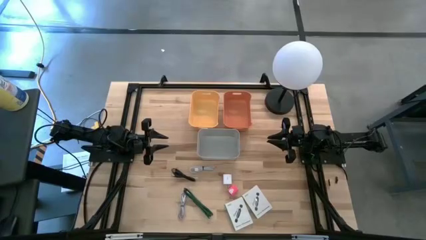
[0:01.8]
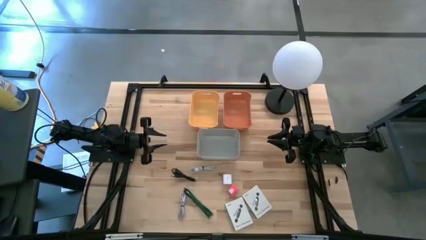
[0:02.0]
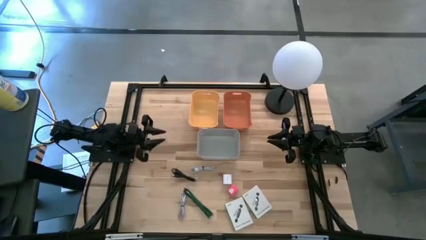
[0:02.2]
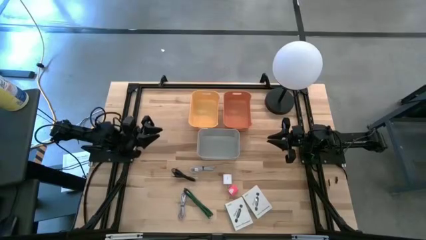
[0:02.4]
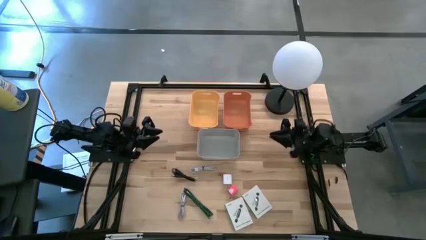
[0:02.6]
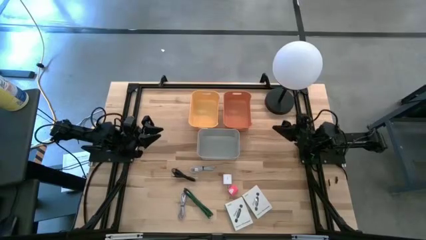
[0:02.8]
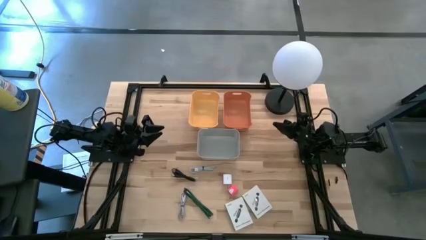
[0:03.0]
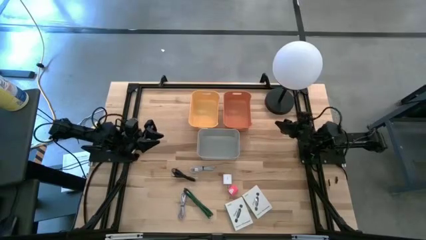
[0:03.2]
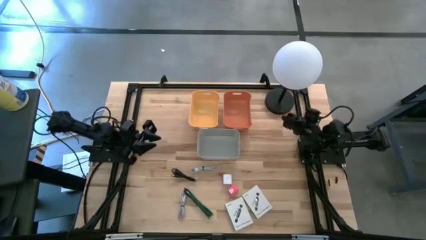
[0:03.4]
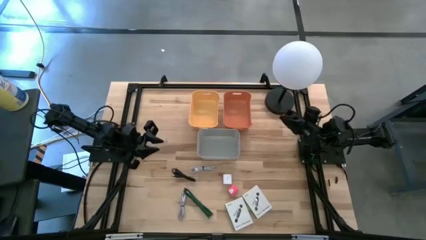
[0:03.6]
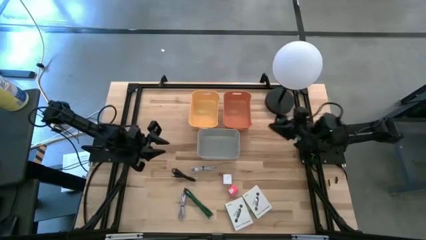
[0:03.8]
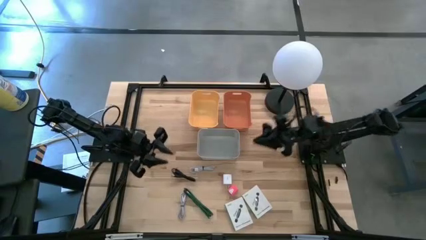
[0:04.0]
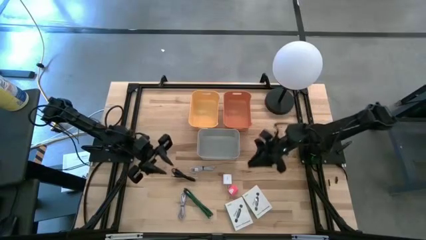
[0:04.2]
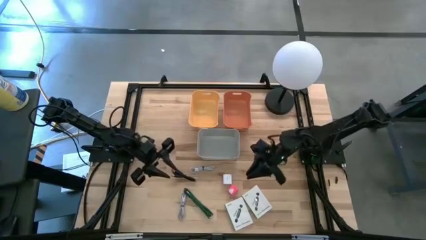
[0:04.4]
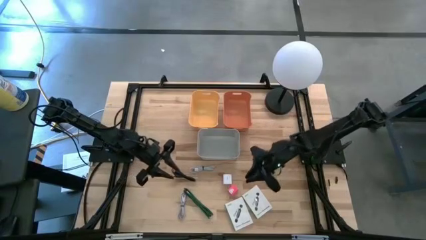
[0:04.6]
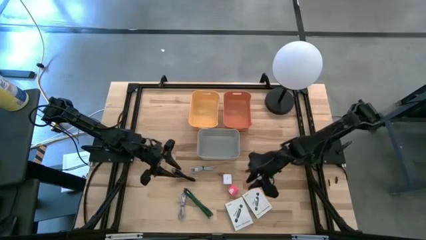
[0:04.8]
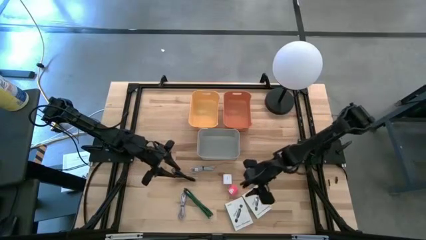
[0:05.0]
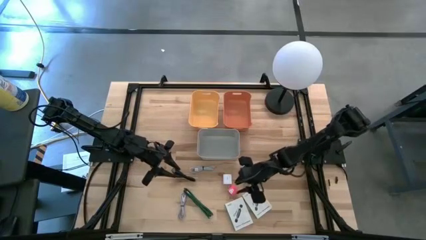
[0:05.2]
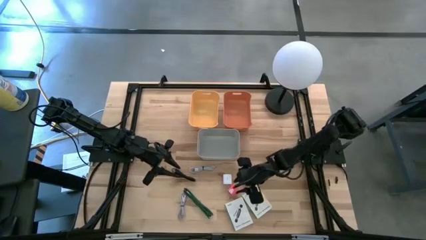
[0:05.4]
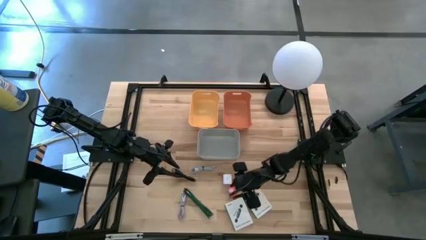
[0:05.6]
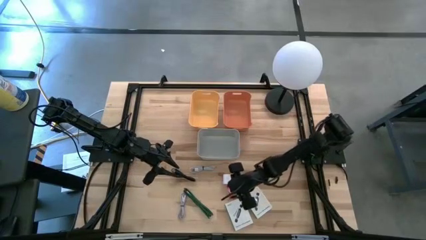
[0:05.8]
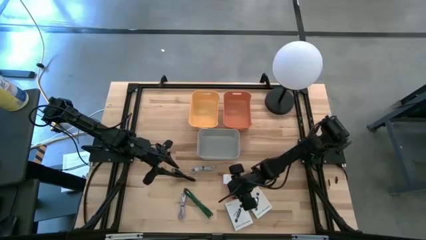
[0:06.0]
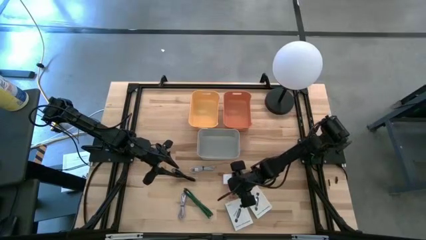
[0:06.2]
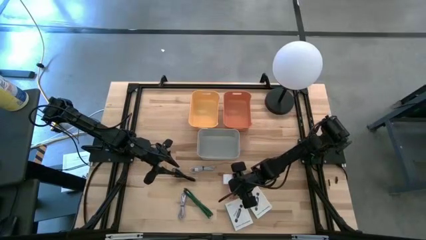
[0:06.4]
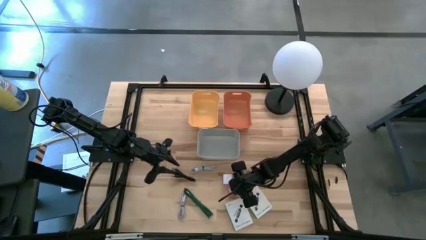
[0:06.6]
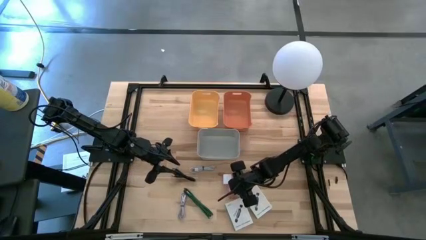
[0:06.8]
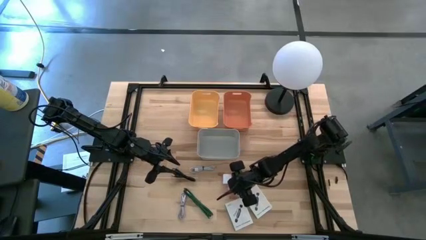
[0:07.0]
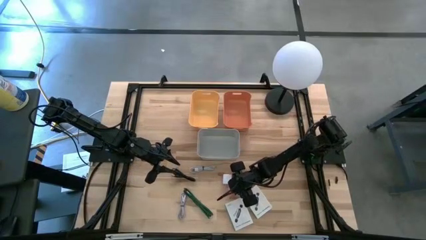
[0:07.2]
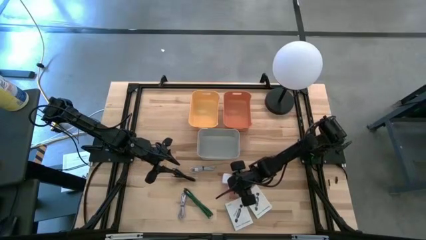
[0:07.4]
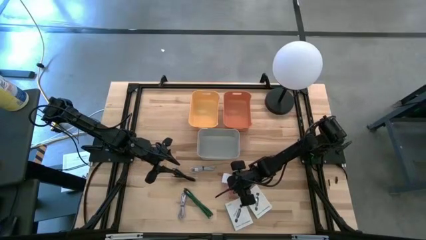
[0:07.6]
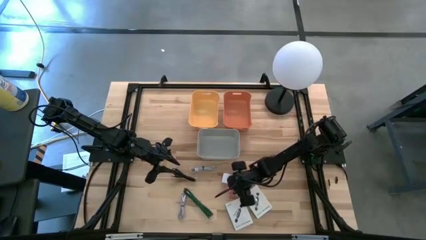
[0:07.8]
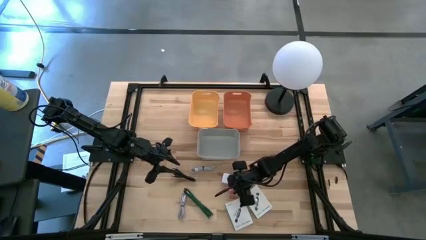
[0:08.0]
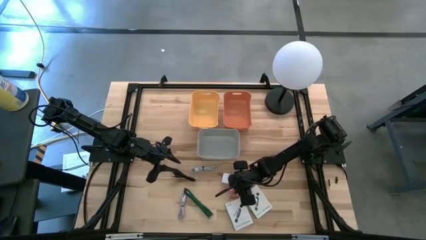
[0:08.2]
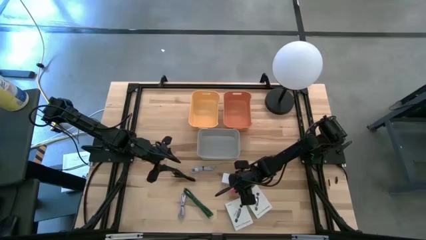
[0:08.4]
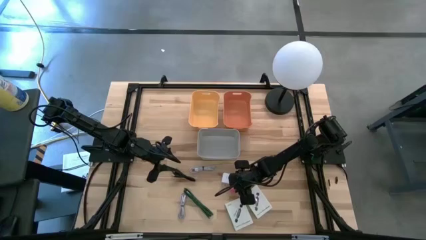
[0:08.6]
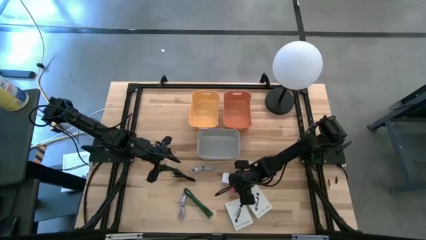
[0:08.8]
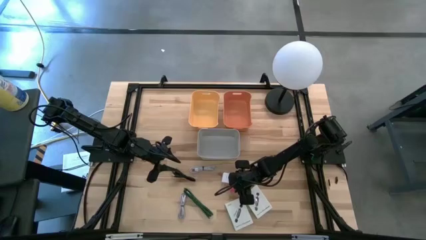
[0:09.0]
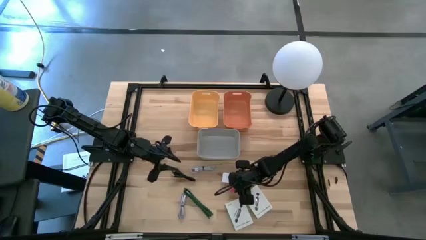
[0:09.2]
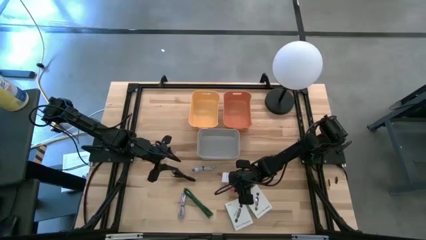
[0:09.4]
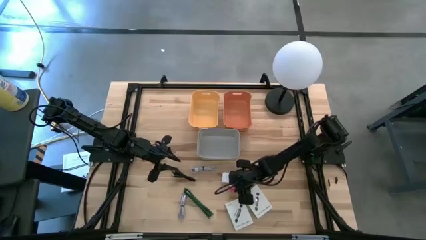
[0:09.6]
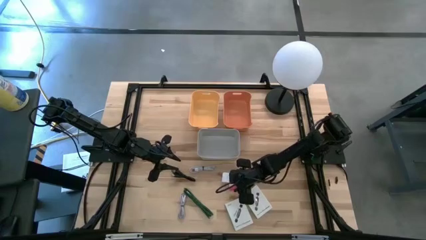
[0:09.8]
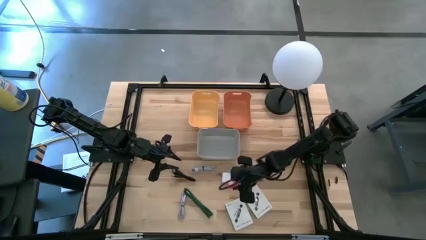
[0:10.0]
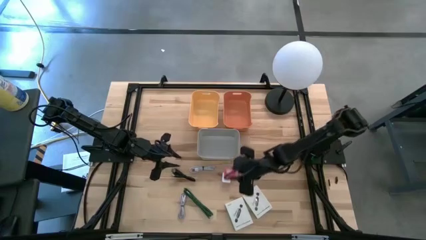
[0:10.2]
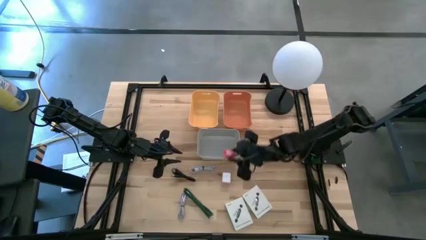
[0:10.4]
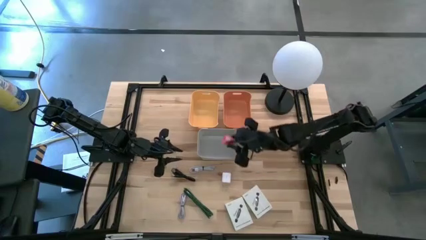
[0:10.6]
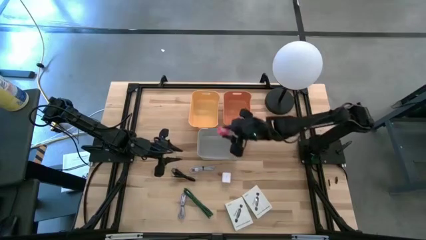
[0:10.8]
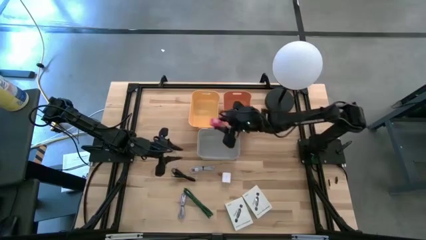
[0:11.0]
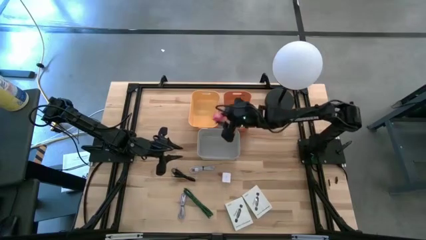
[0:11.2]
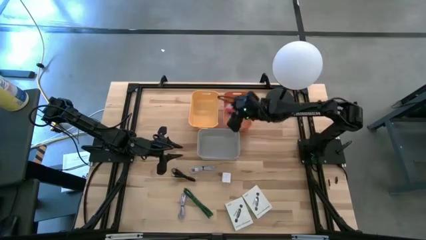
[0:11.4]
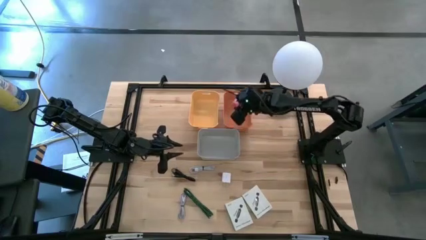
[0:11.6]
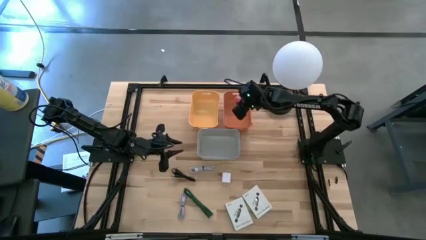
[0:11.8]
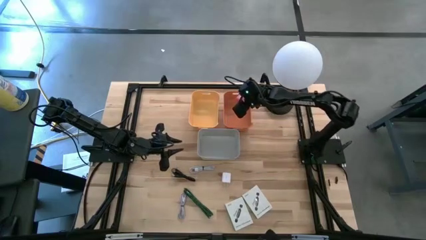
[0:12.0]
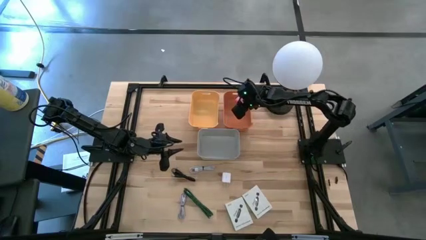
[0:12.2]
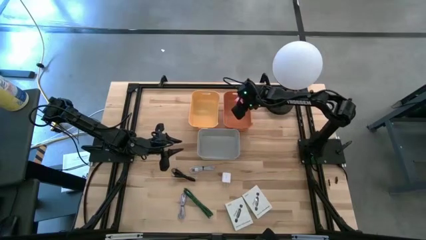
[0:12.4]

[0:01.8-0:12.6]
Task: Pick and place items into bin
Put the pink charger adapter into the orange bin
